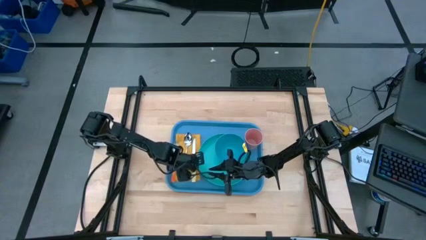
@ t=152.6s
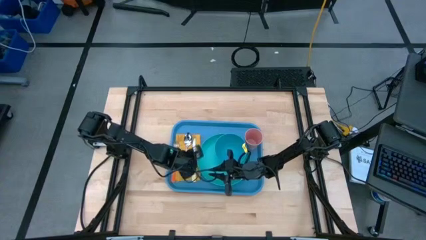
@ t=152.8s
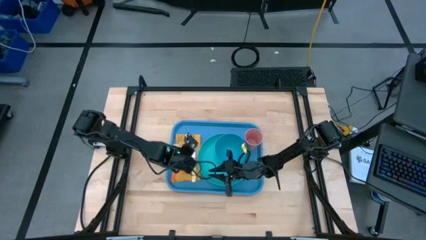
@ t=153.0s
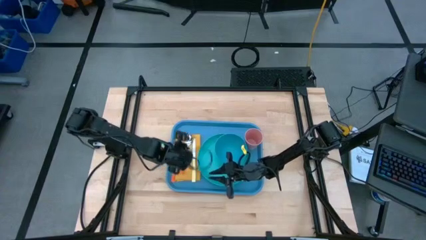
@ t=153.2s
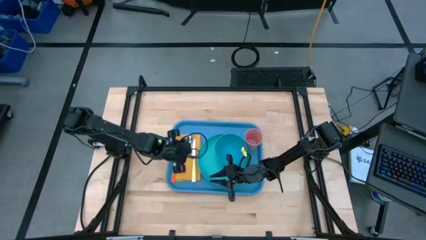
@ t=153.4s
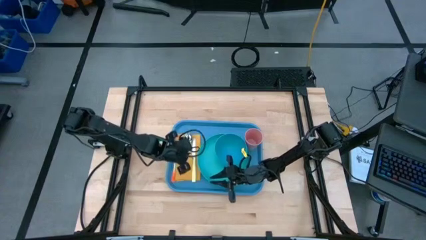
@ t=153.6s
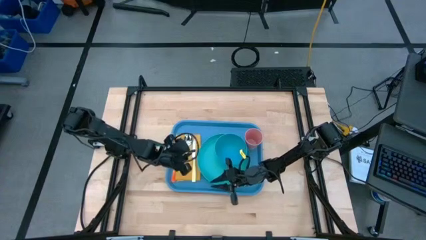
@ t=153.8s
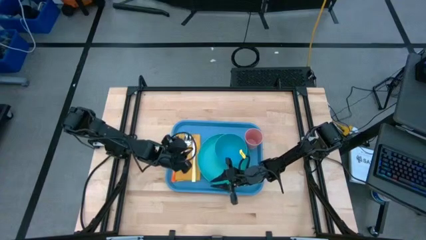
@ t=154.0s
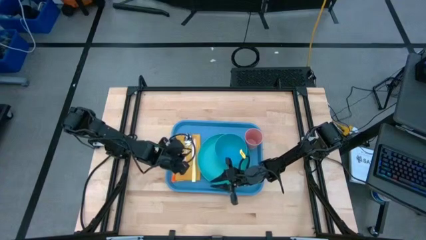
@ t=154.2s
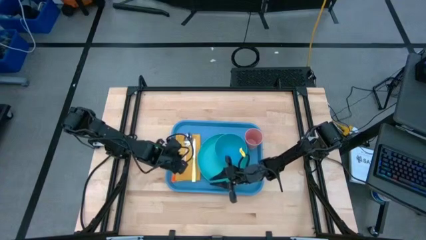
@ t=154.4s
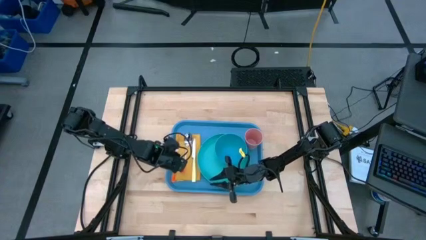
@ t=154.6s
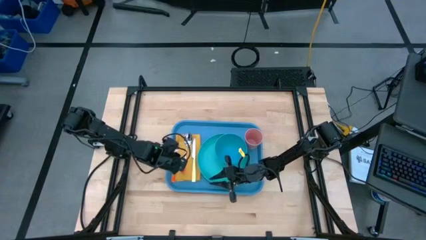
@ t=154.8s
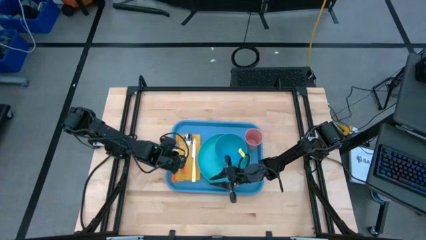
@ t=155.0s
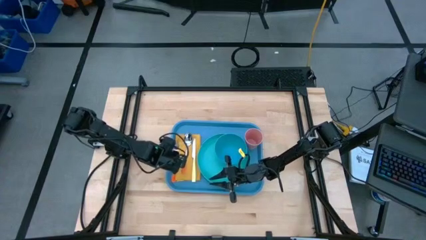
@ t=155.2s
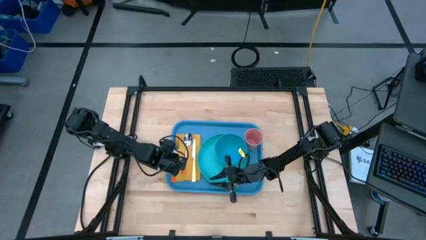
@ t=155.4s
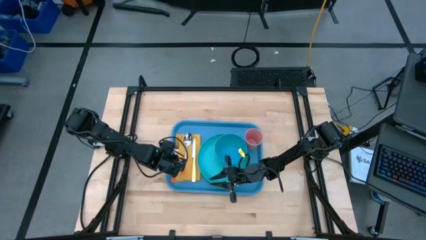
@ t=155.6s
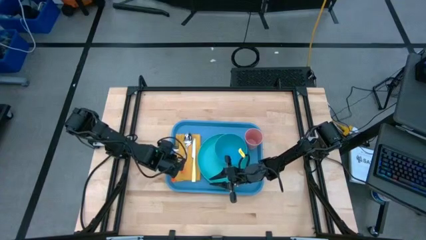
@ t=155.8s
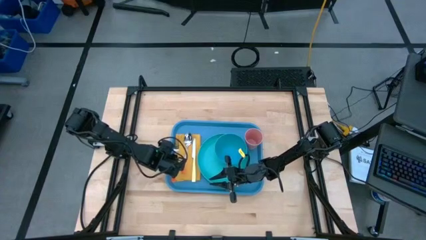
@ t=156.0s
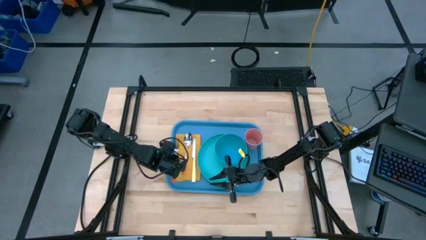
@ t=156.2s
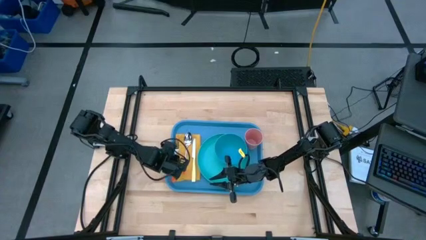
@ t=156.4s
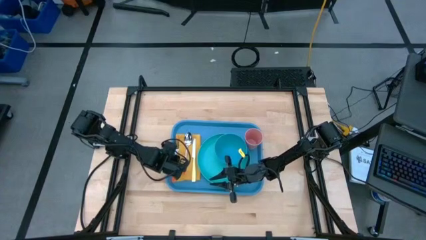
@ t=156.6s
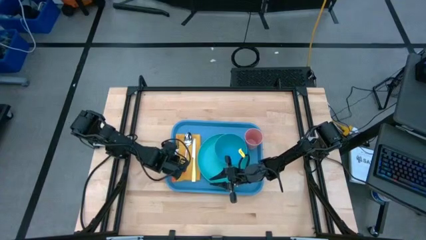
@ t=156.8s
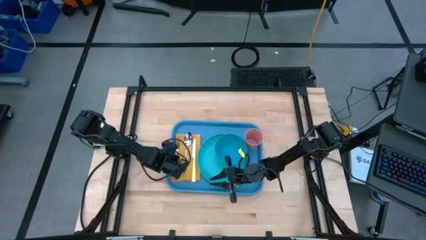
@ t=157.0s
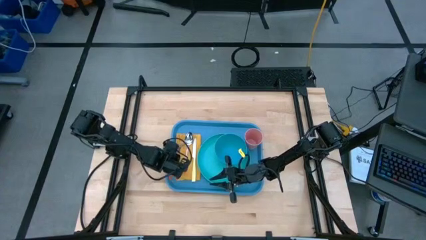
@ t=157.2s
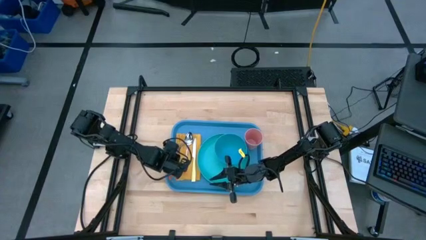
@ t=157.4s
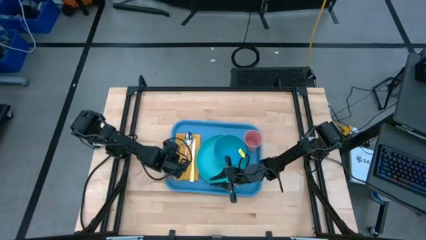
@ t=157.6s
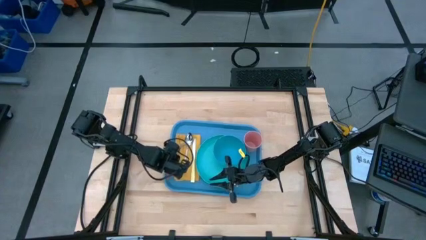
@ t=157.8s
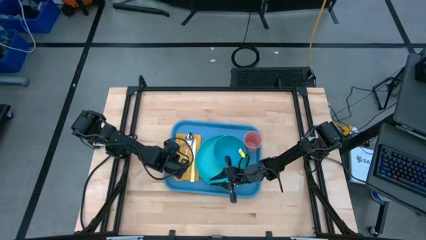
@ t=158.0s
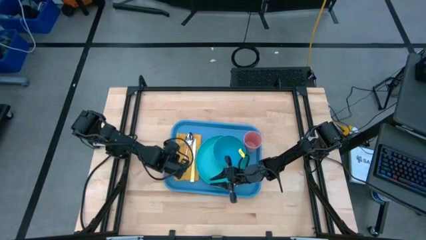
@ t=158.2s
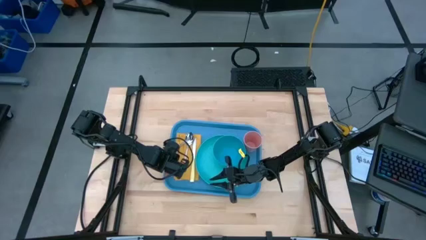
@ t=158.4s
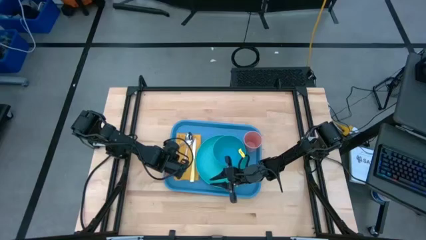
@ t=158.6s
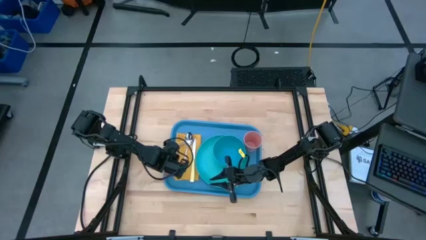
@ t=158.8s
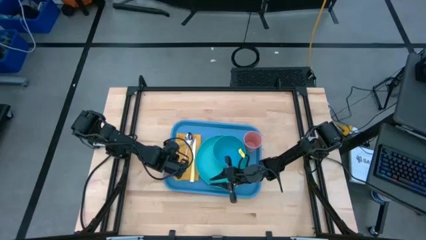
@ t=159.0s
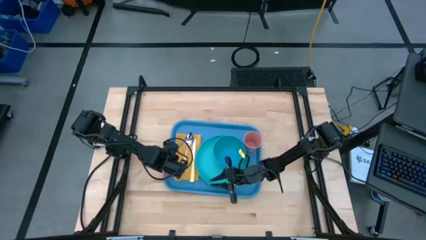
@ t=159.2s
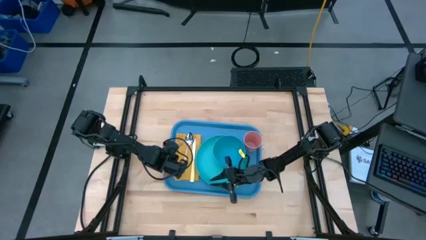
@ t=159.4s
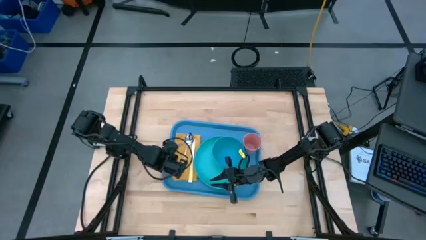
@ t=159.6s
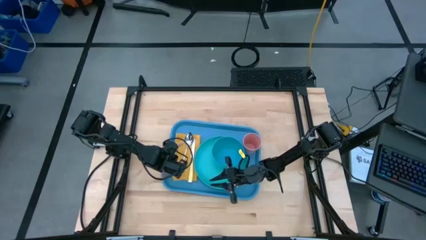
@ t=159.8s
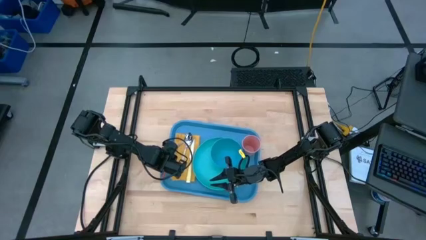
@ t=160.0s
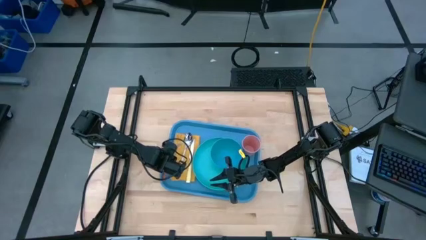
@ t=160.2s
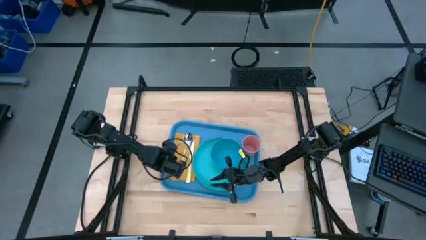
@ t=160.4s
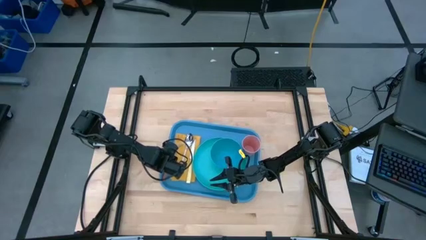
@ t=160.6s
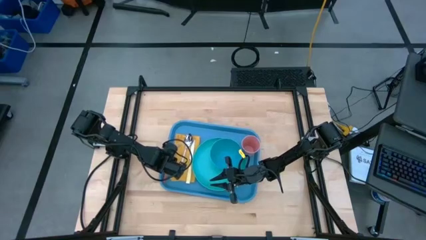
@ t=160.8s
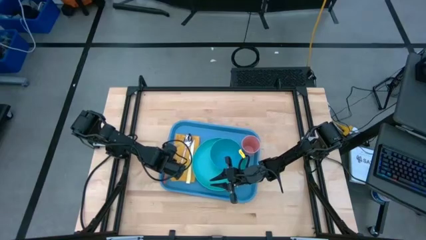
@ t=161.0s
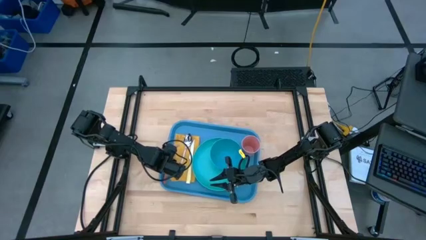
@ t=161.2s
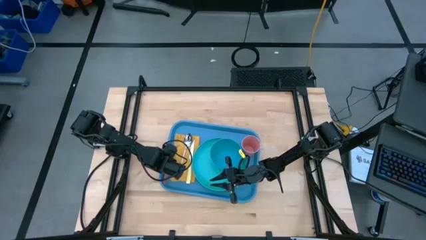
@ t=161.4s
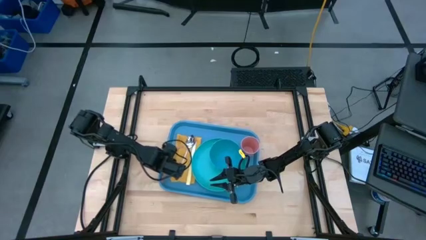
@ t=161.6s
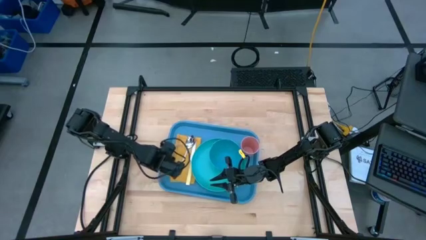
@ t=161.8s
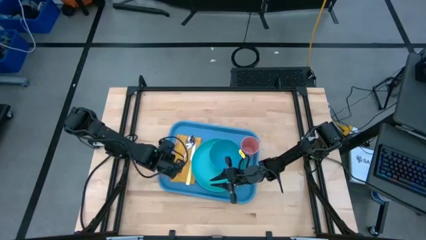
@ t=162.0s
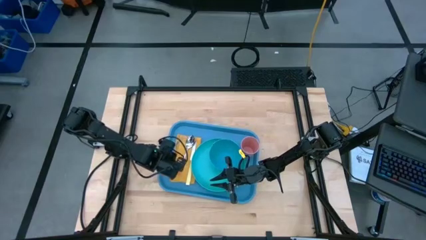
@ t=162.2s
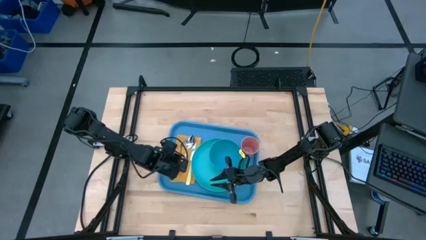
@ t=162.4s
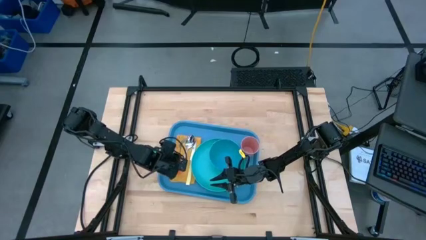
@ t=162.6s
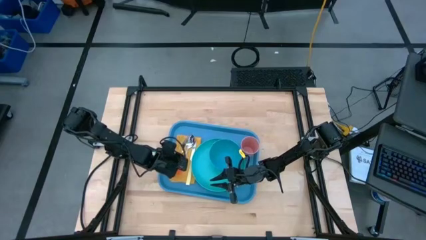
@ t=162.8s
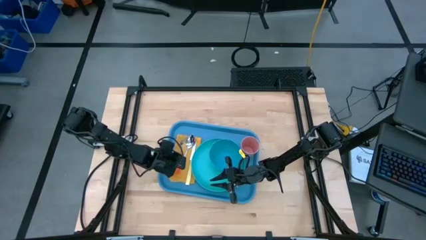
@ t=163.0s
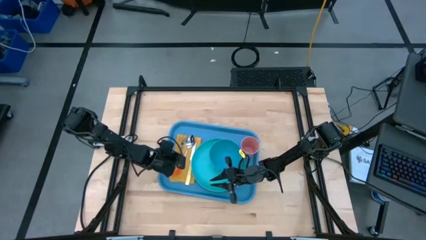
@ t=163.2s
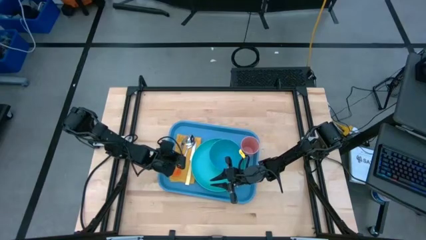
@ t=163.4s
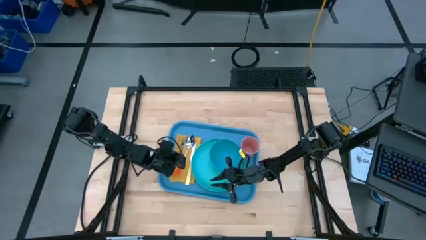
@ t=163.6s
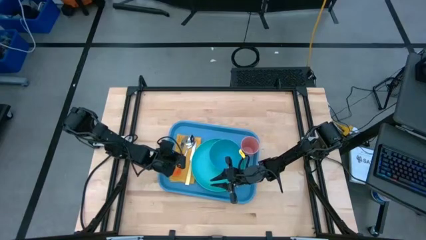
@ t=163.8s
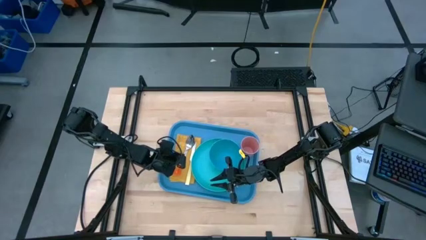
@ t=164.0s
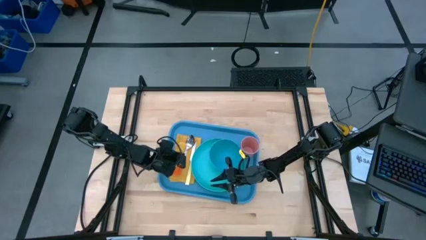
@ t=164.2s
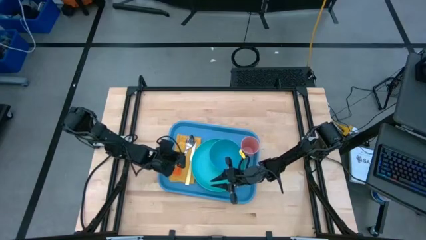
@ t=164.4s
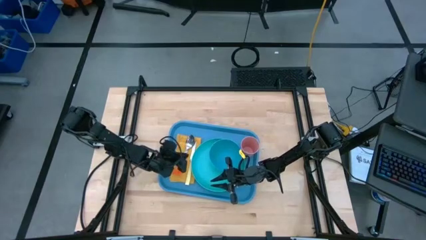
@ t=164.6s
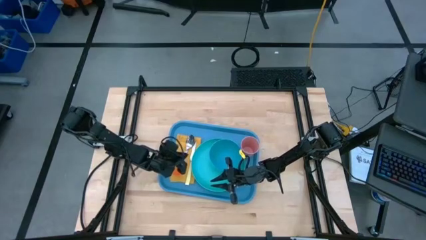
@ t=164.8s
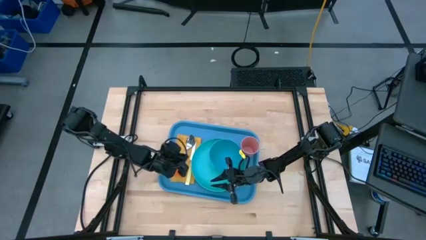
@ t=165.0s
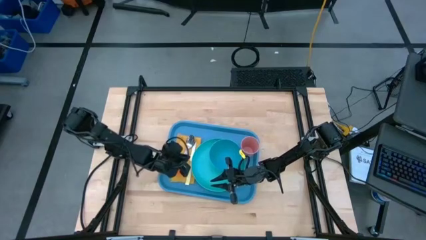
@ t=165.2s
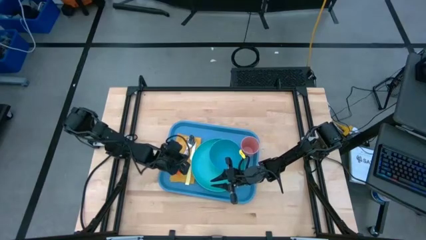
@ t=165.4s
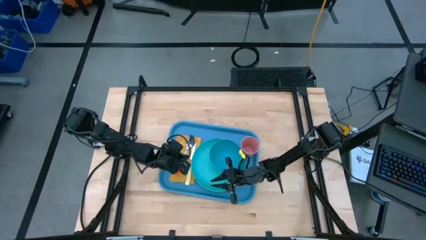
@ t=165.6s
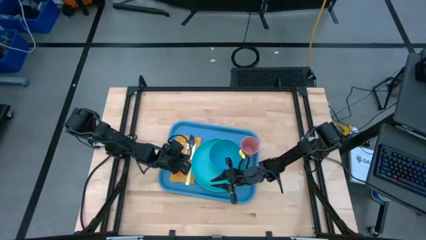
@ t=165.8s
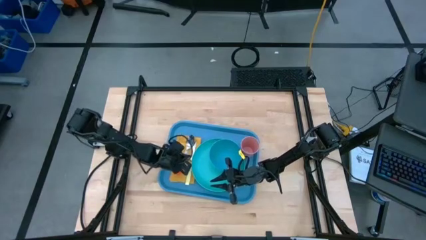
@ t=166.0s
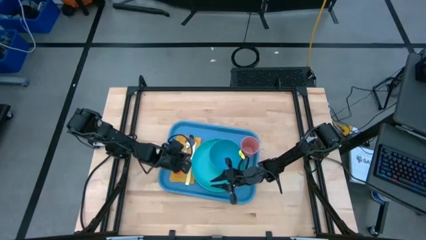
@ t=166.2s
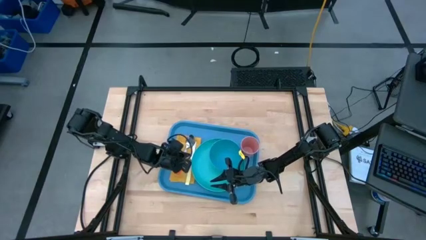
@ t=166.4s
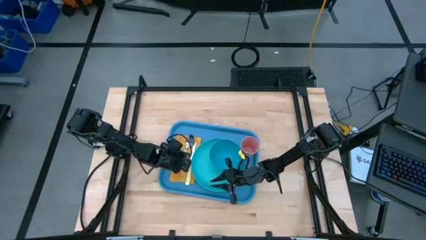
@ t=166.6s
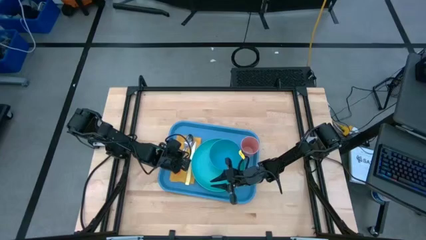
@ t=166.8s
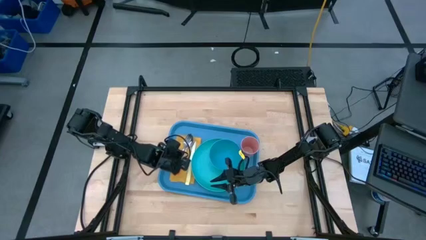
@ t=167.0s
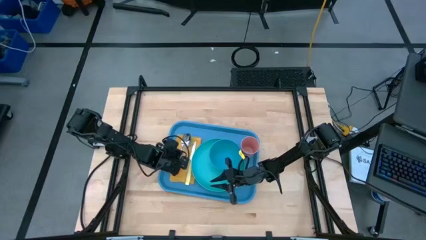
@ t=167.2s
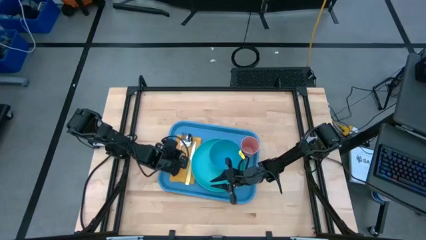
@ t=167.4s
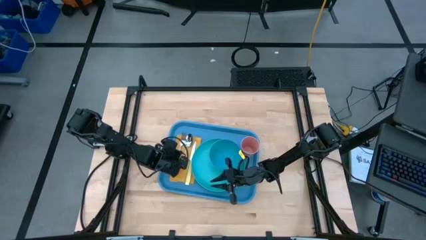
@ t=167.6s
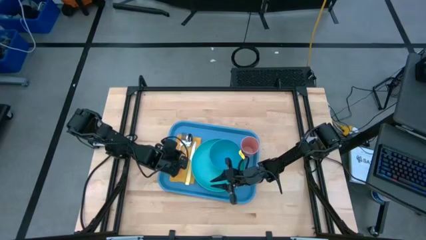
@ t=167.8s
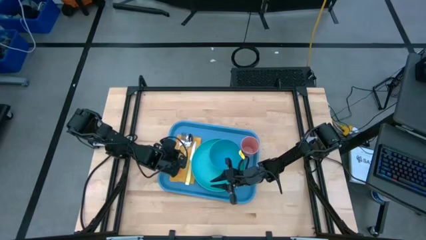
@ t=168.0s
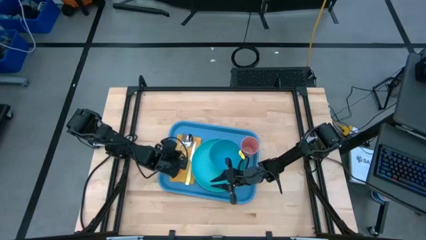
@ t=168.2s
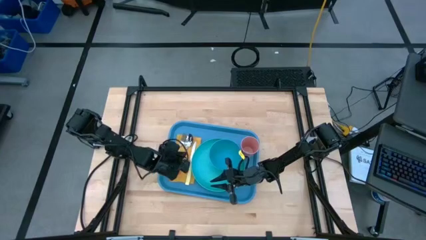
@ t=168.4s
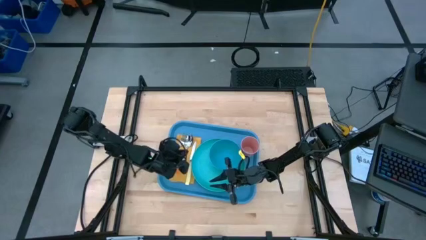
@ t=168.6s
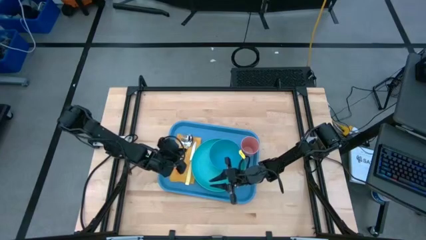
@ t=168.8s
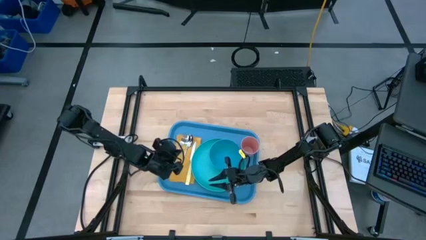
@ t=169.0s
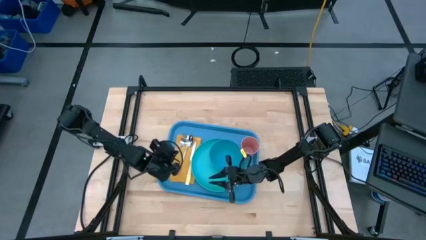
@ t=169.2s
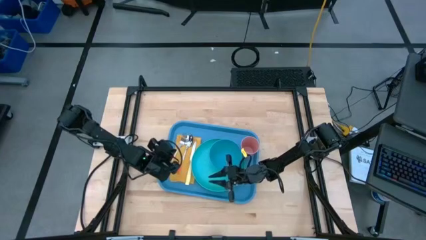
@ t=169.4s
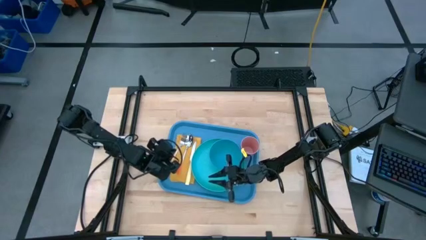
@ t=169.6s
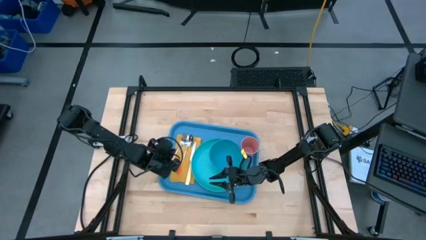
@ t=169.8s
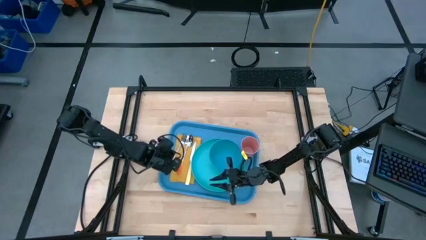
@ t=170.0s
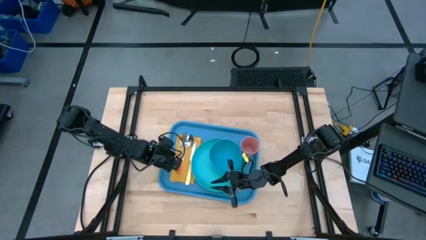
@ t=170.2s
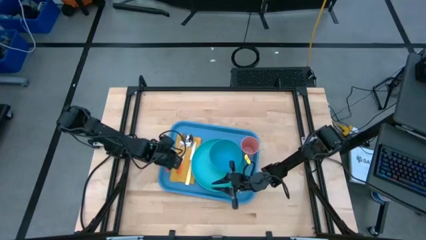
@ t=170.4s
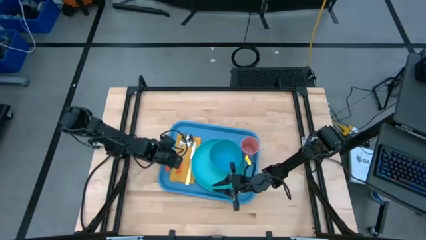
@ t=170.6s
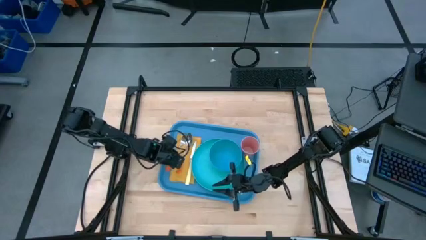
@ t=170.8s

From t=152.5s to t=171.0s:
Task: Set up tray
Put the orange fork on the yellow napkin
